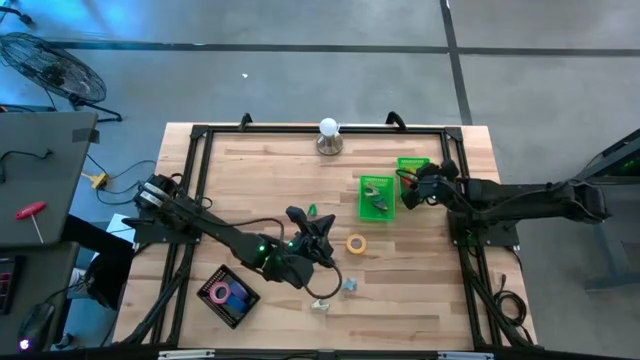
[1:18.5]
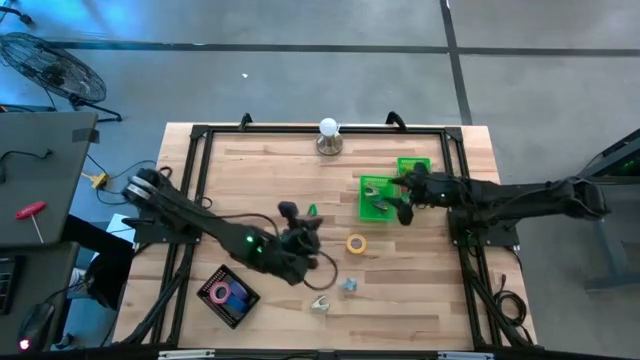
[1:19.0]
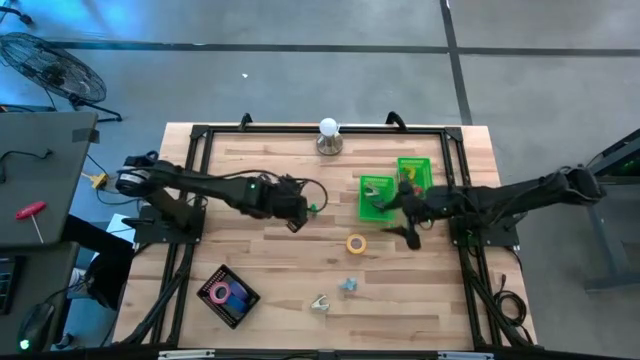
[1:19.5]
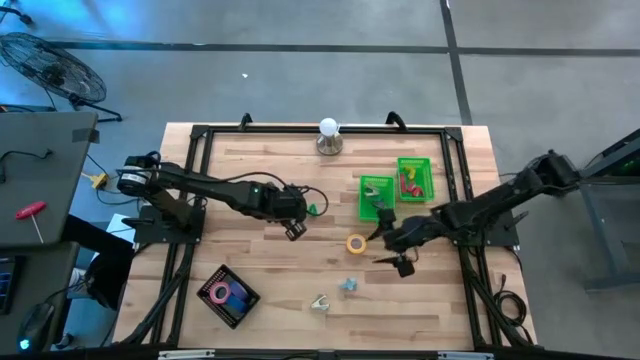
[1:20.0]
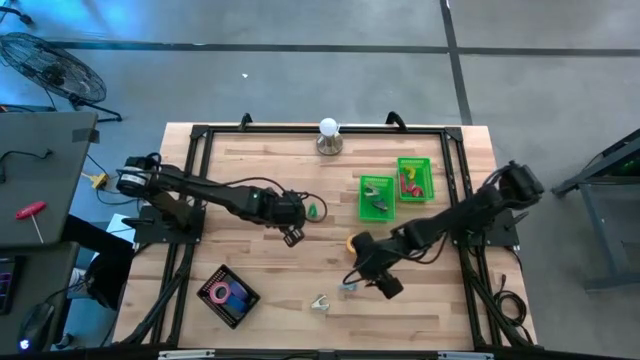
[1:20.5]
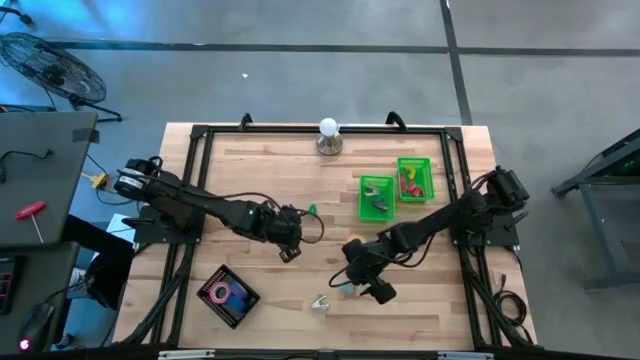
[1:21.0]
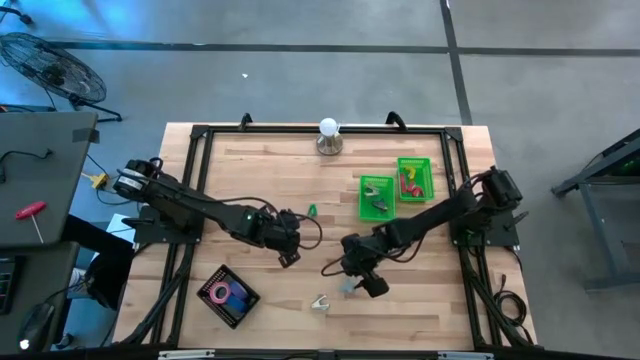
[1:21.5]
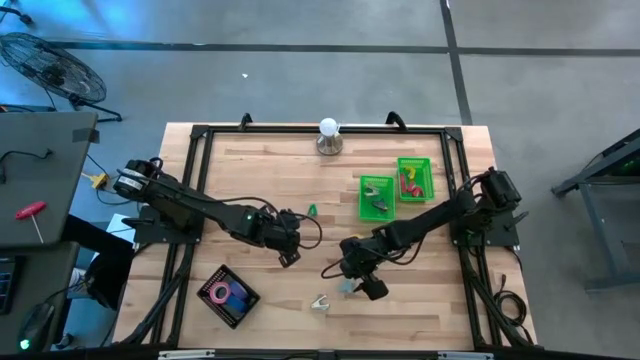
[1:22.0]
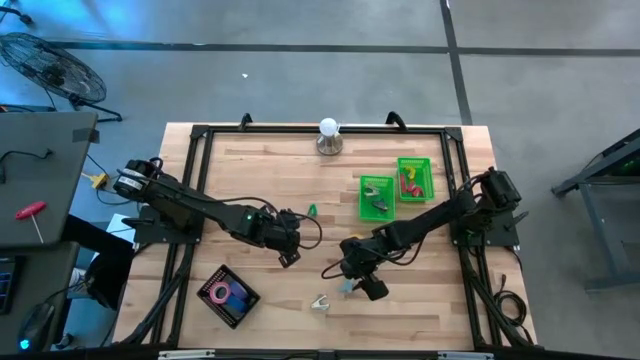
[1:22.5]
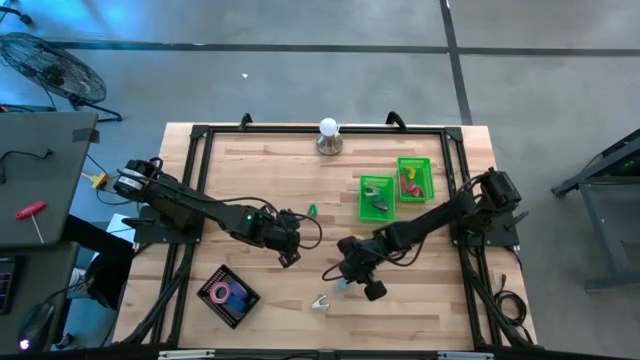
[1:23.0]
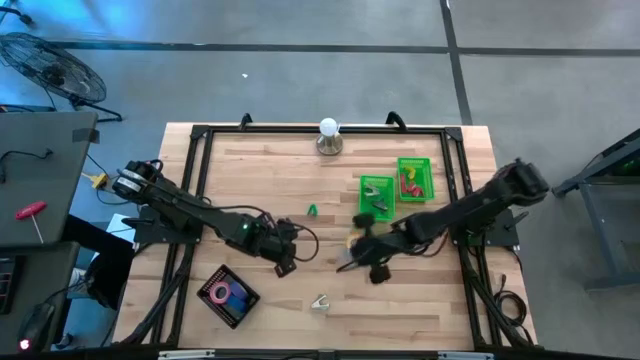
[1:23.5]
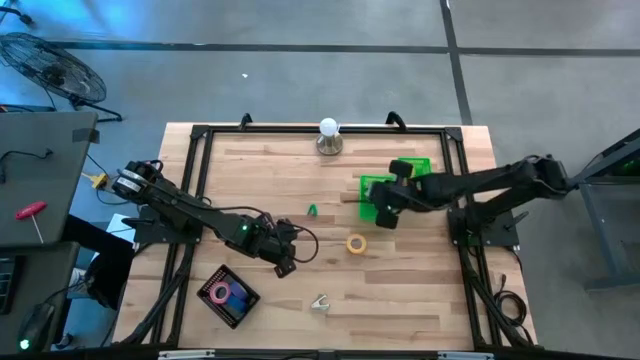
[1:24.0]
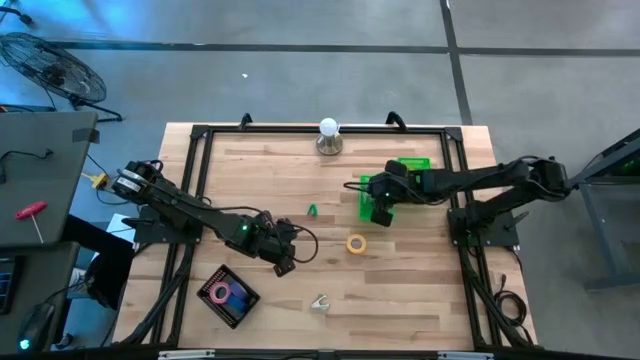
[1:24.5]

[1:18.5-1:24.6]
Task: Pick and place Stapler, Stapler remover, tape
Put the light blue staple remover into the left green basket

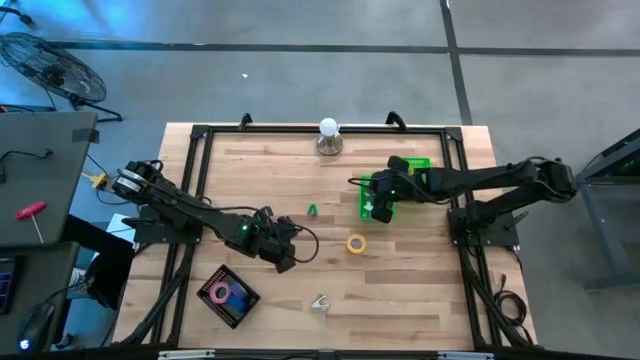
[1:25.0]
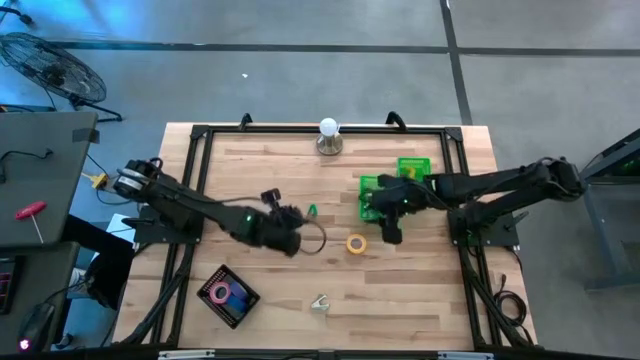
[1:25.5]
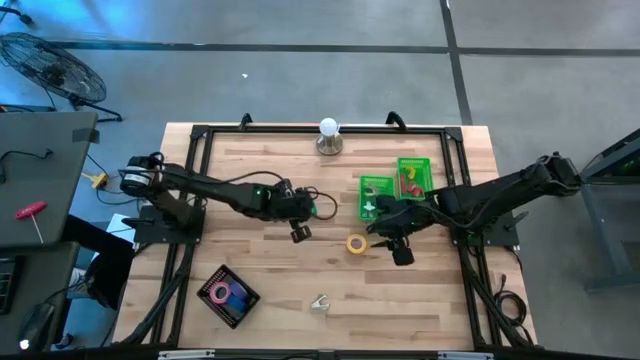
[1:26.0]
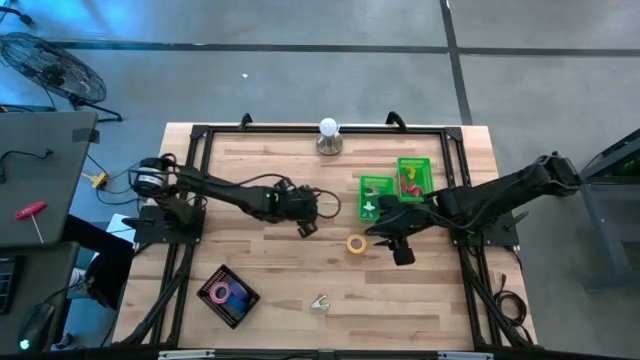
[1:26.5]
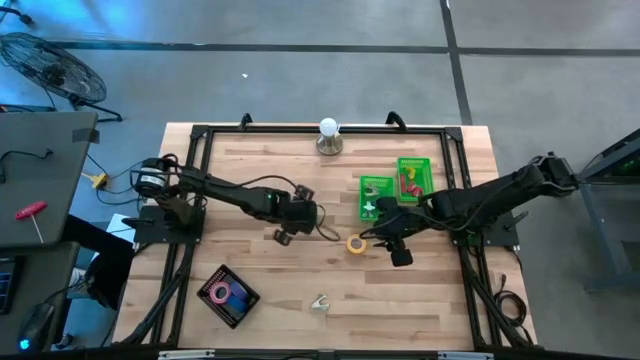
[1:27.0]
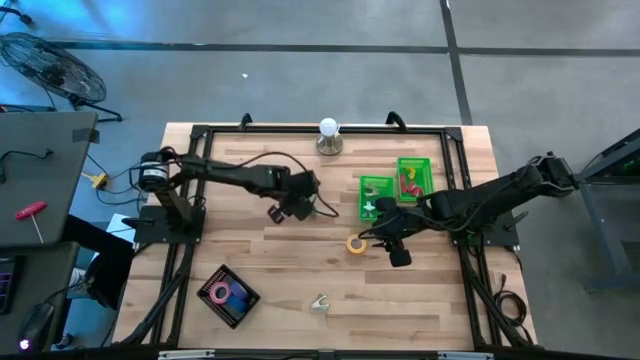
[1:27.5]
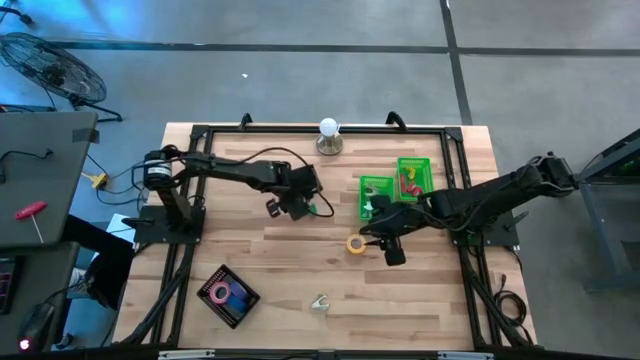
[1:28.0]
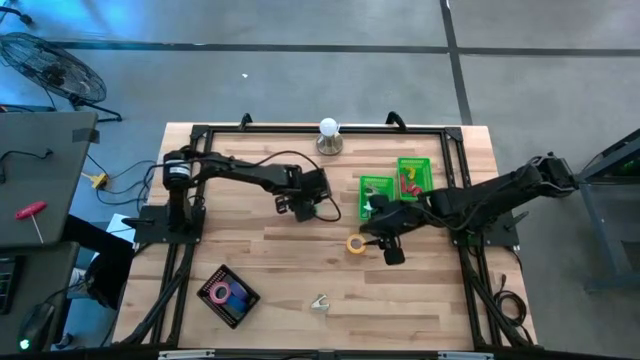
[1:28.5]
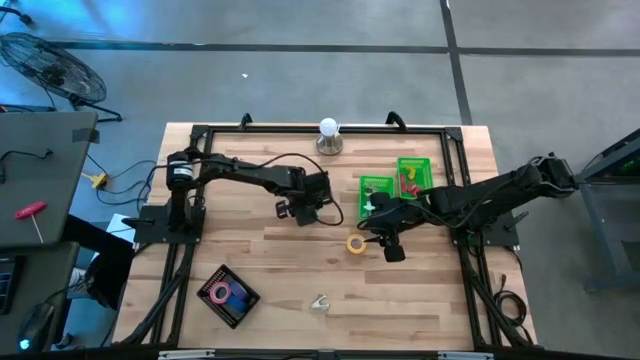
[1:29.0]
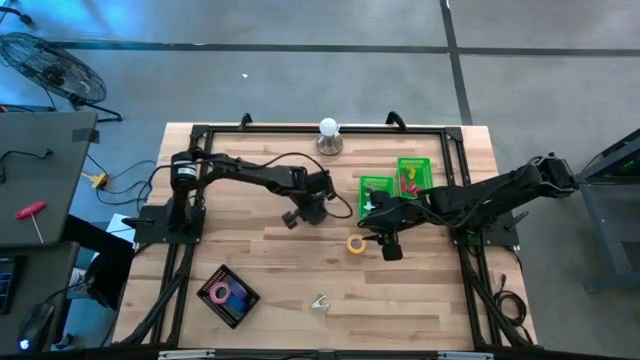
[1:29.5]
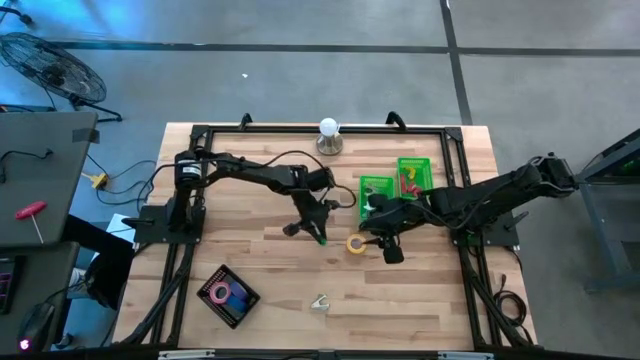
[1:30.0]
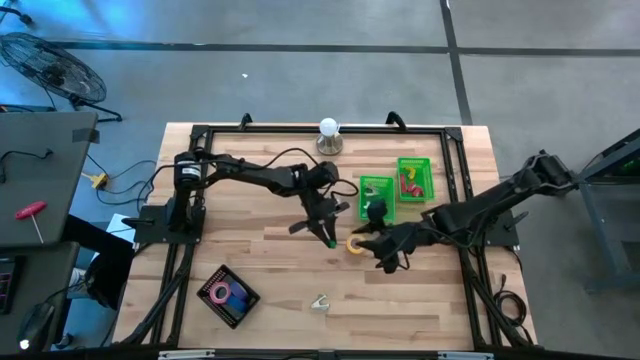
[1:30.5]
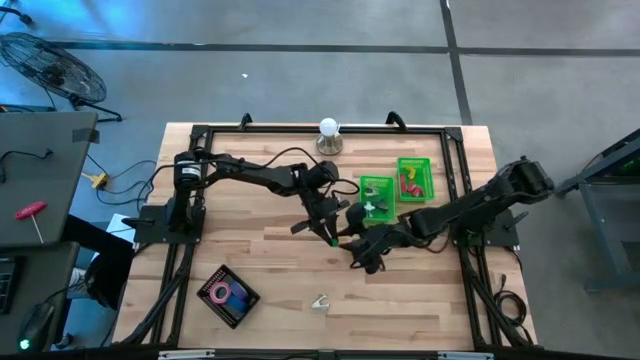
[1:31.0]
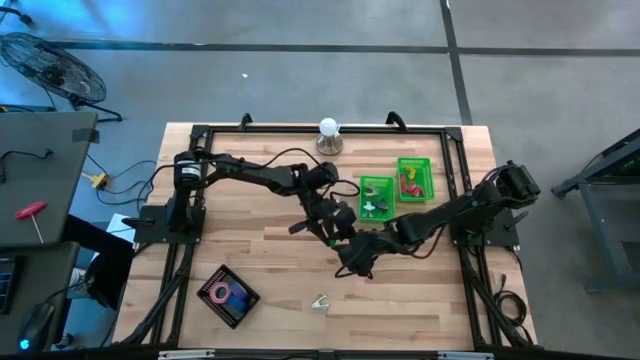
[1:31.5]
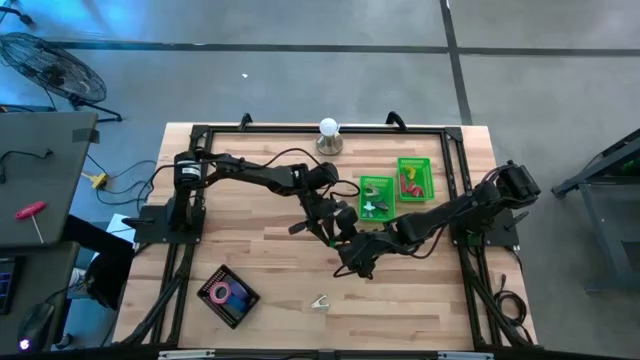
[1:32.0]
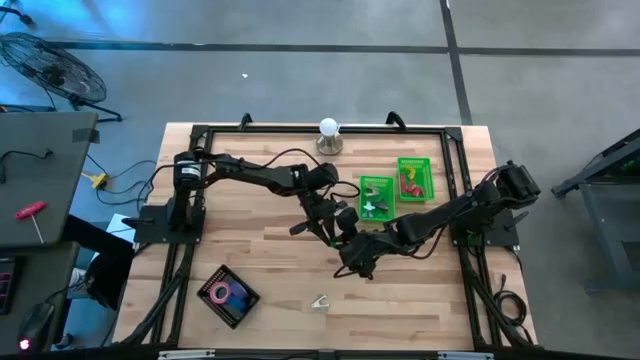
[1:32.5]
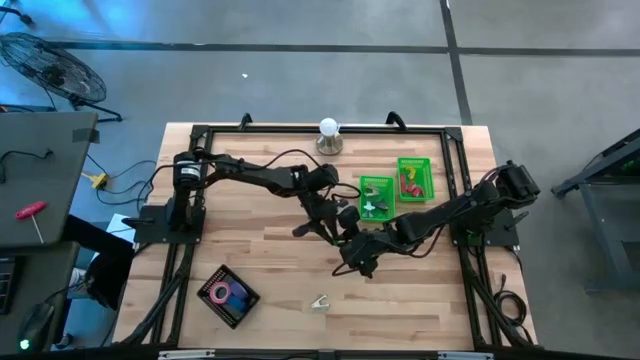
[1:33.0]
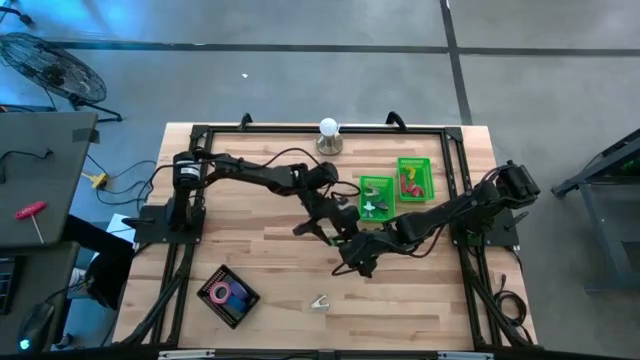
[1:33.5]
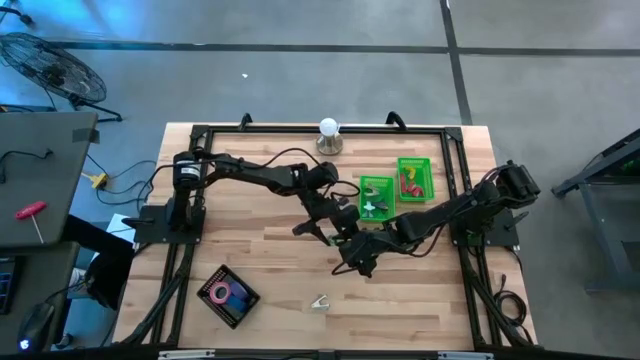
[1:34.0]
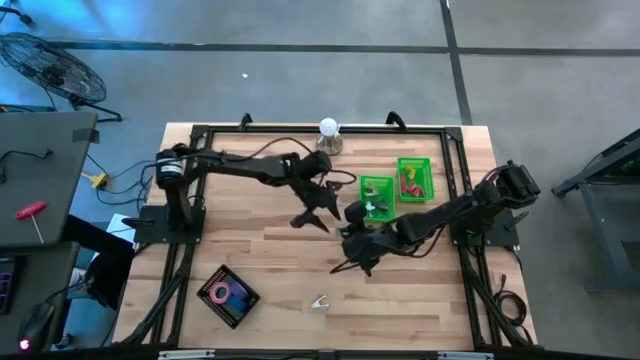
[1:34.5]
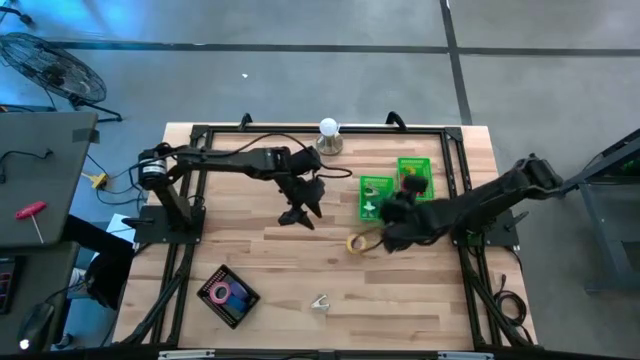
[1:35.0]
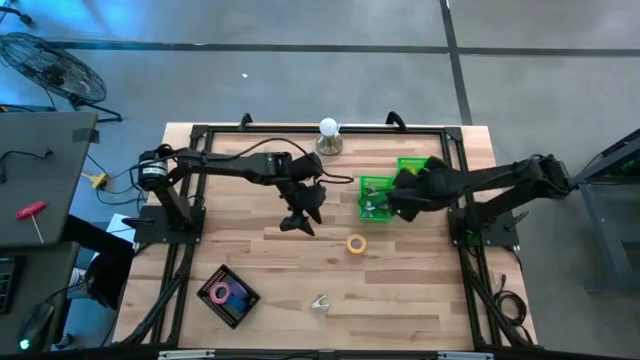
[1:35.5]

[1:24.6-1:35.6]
Put the green stapler into the right green basket

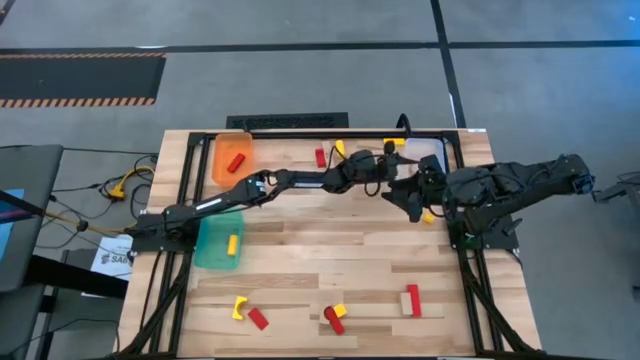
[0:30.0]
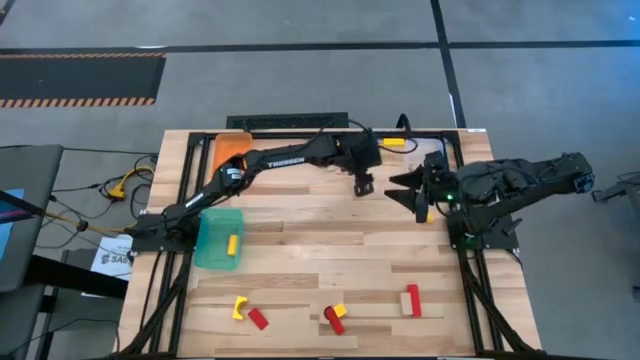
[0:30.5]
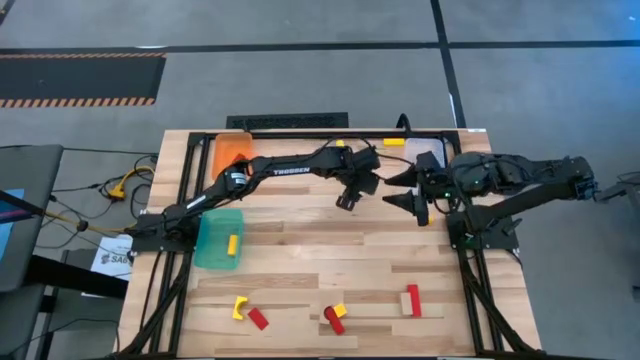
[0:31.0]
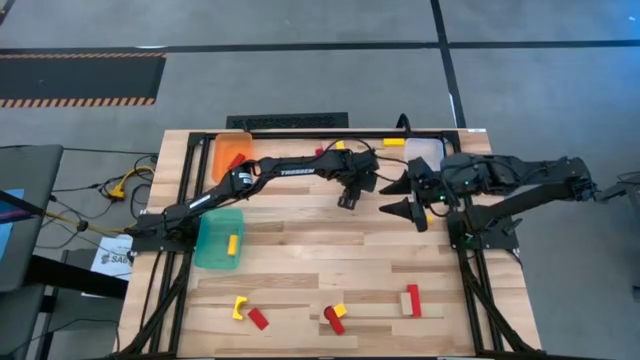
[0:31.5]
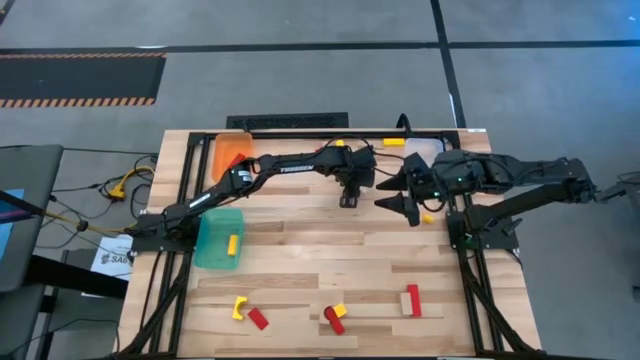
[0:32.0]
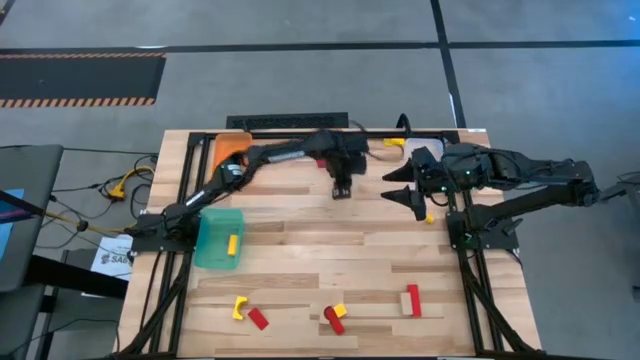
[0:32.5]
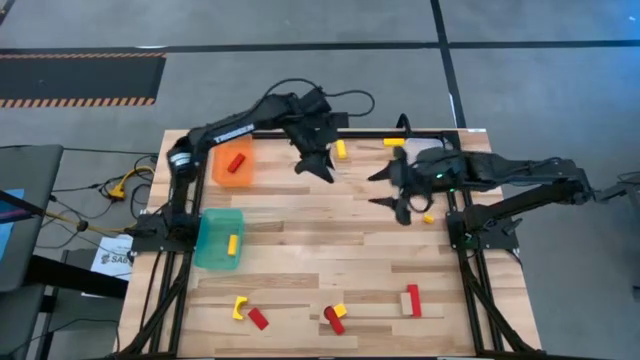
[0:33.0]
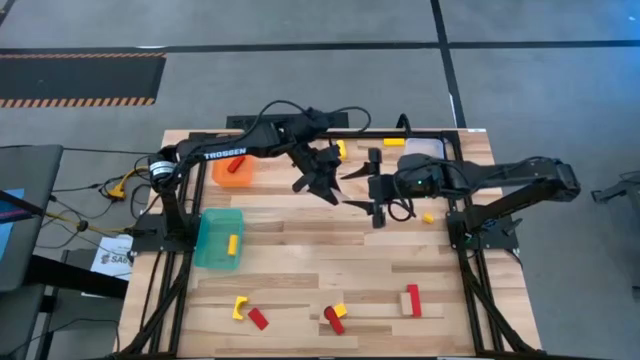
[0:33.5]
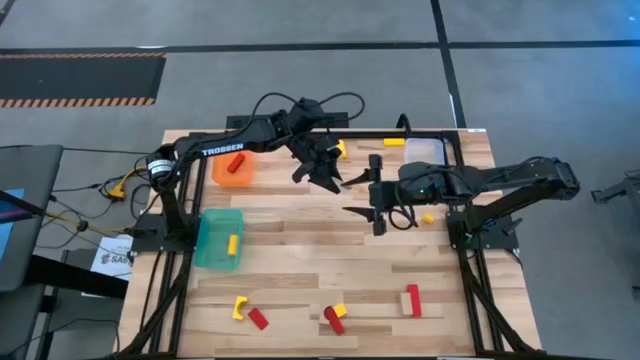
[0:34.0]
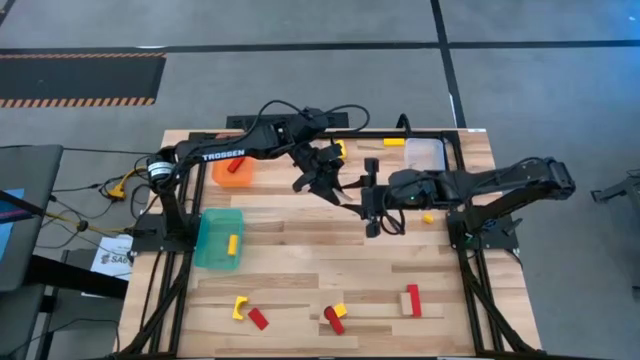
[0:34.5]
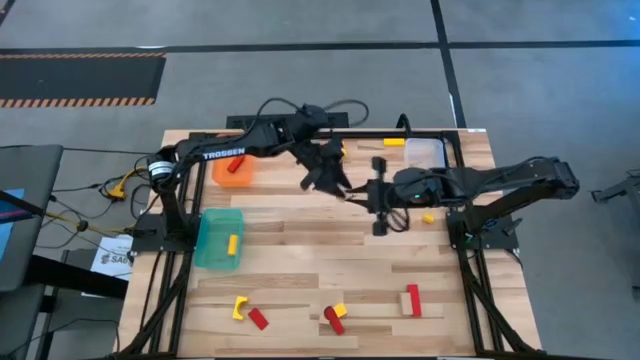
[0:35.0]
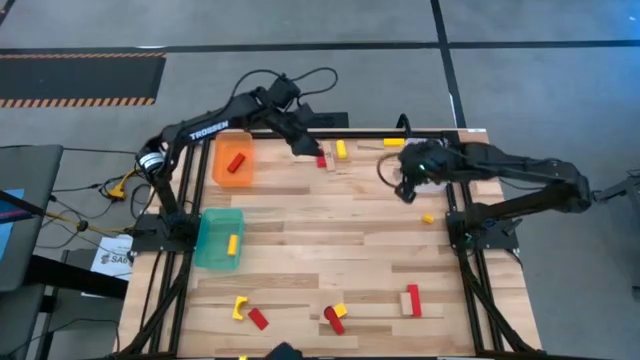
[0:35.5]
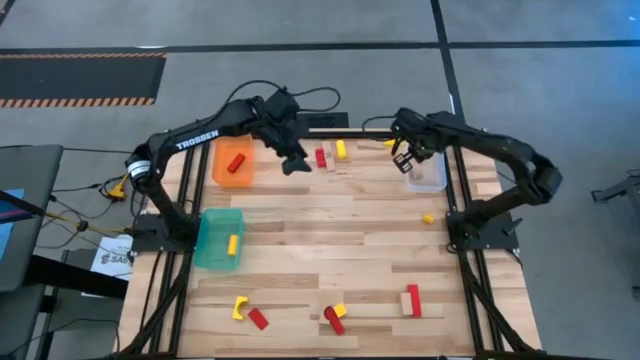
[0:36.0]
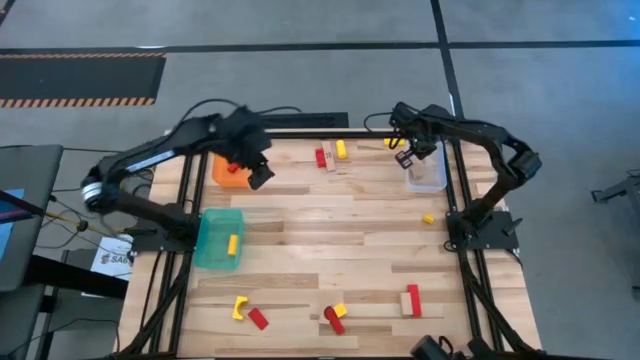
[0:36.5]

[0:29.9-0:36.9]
Task: Sort & place blocks by color
Put the brown wooden block into the white bin
